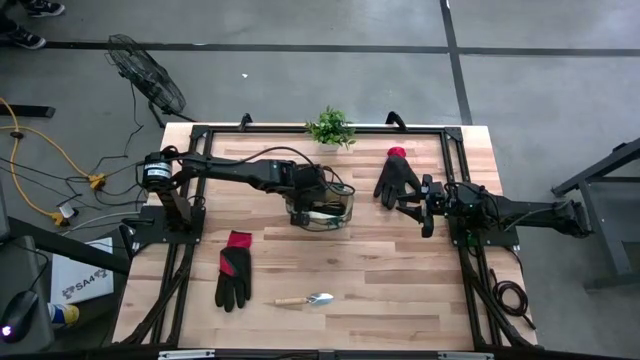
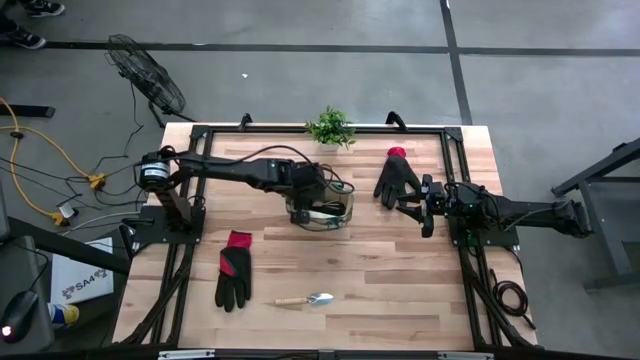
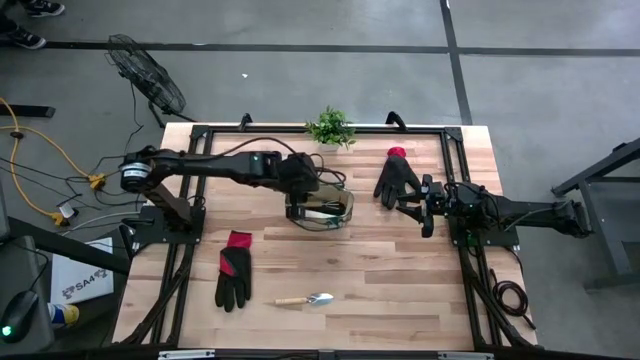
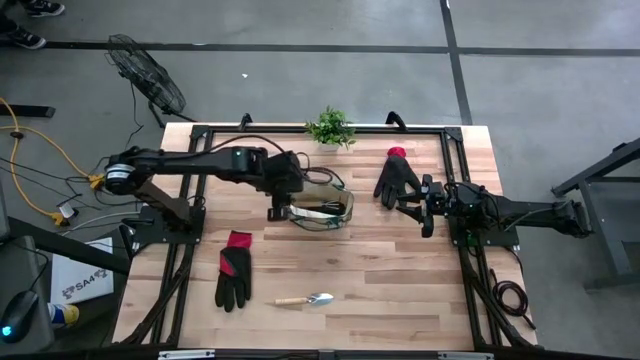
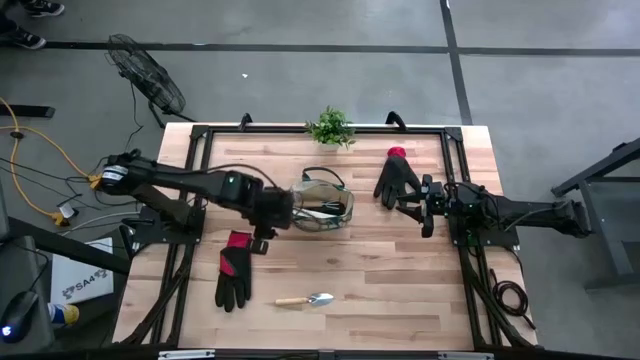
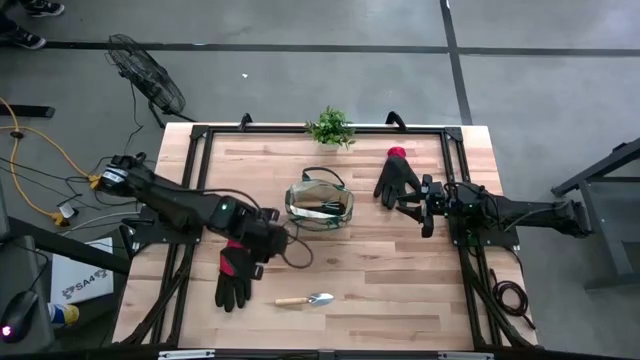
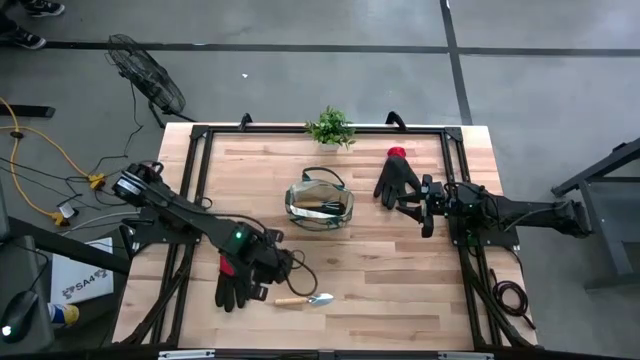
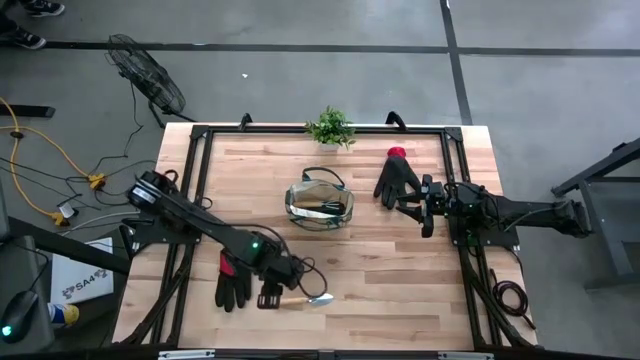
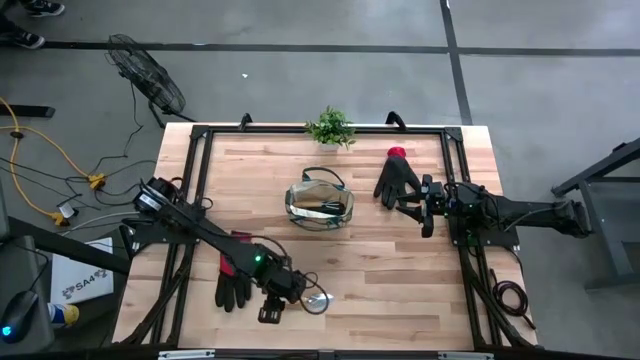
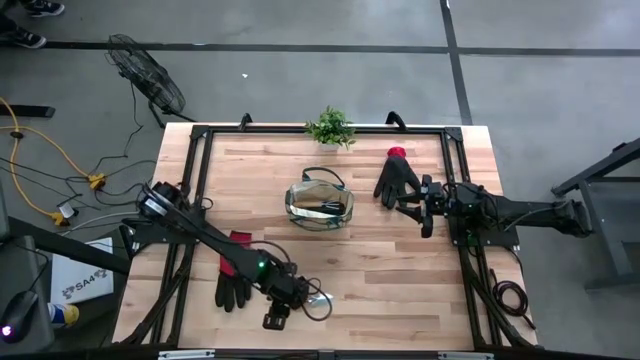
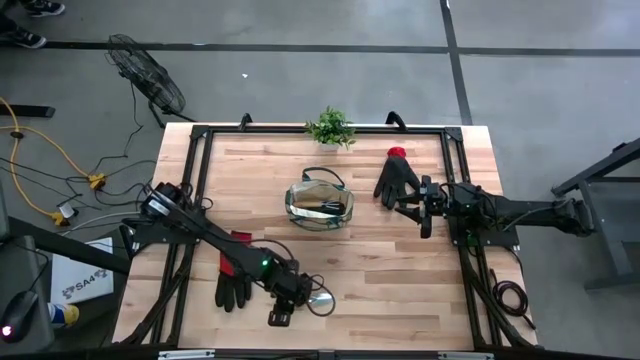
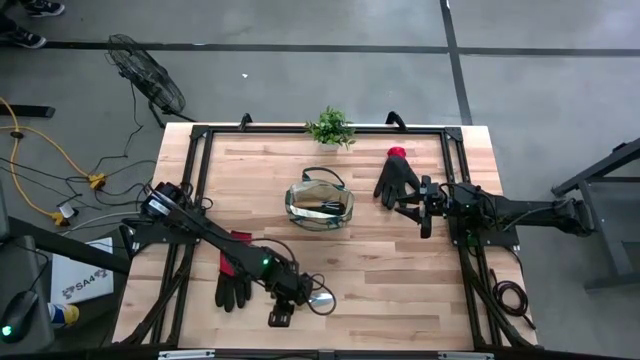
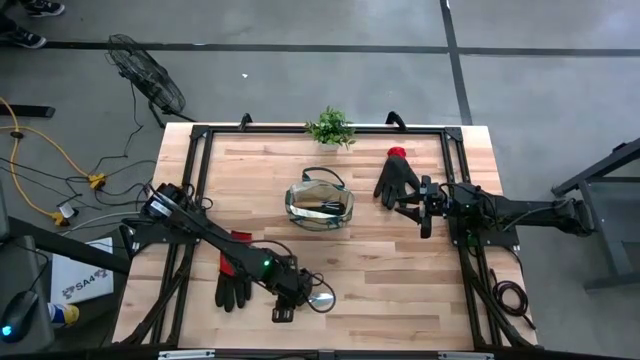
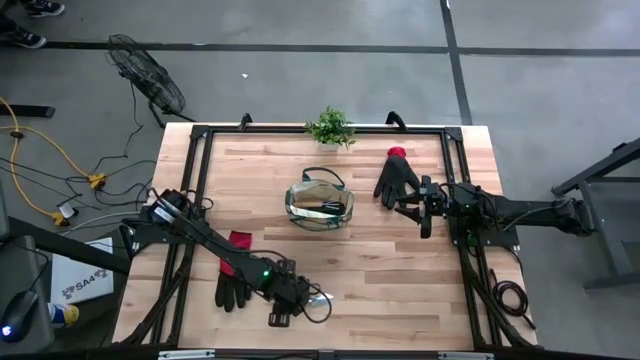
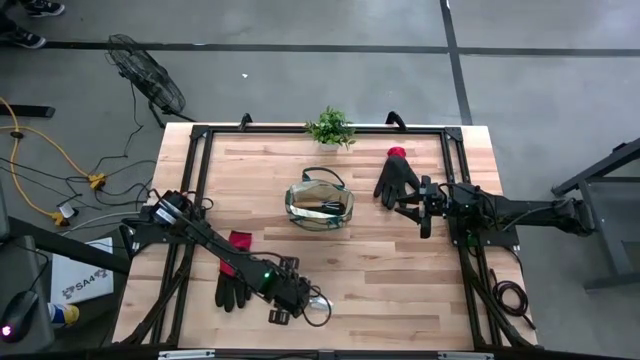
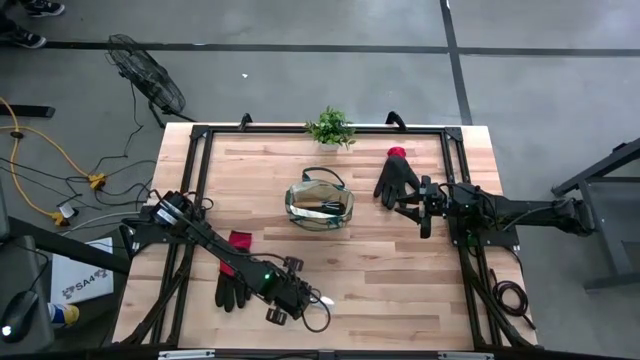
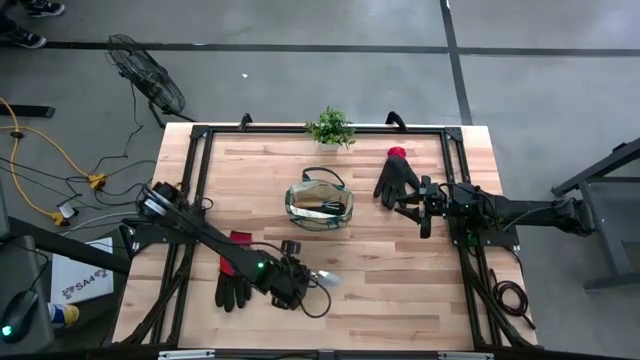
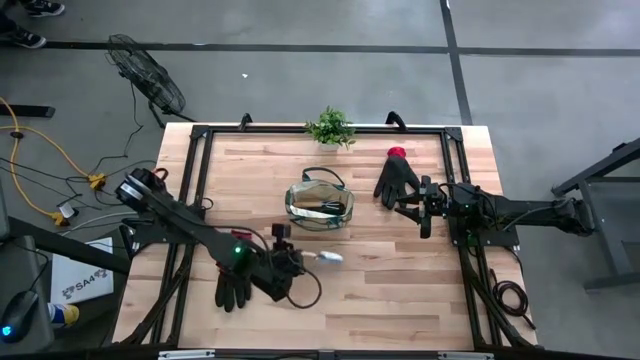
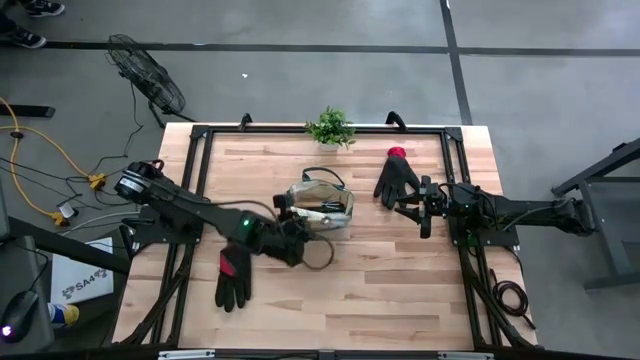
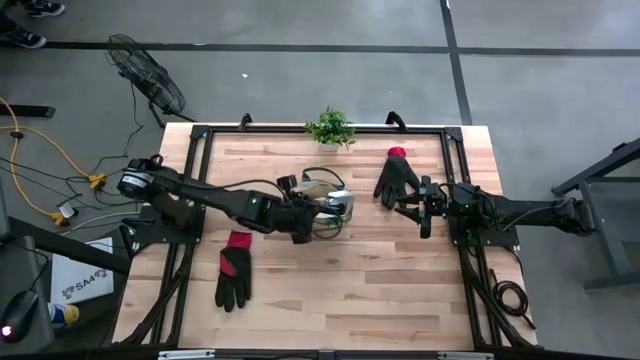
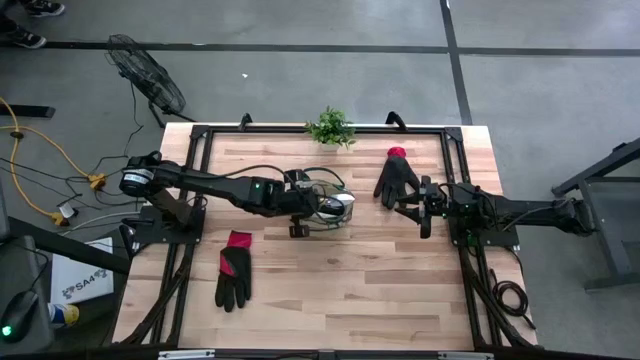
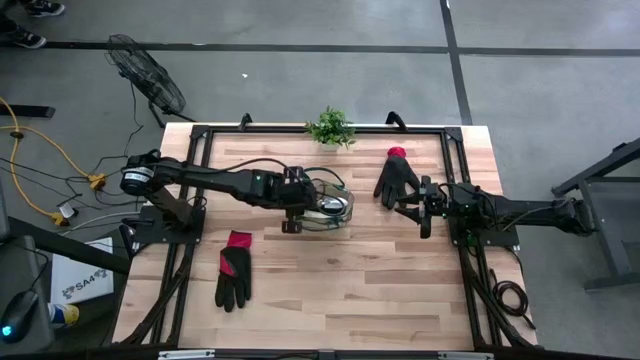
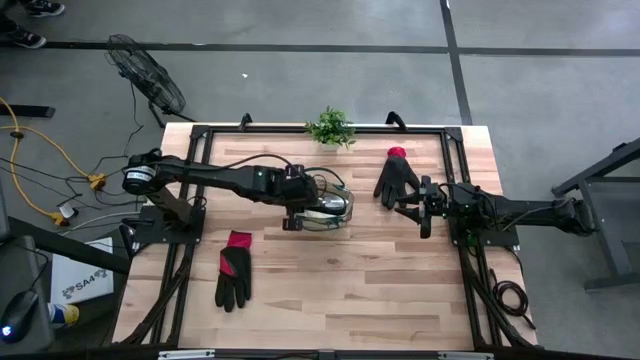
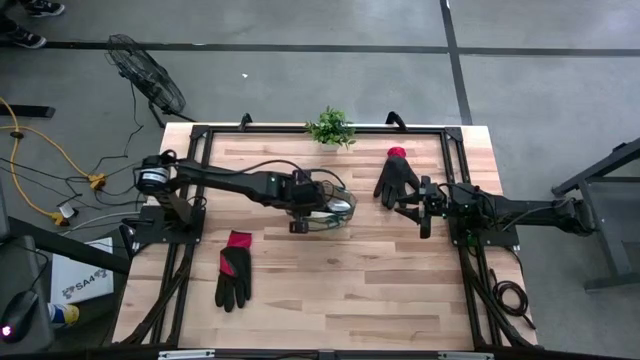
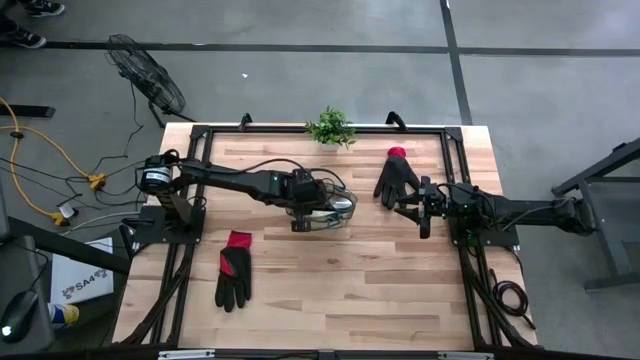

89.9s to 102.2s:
Task: Pick & Place Garden tools in Gardening bag
Put the brown trowel into the gardening bag

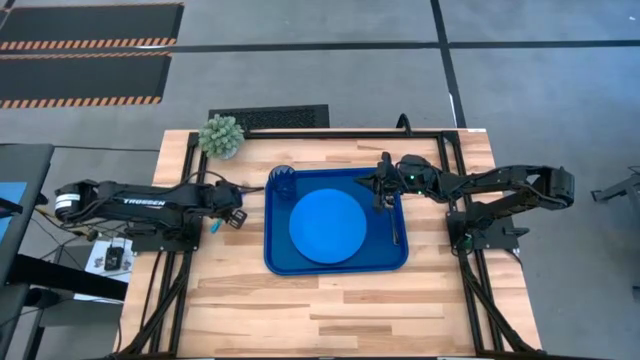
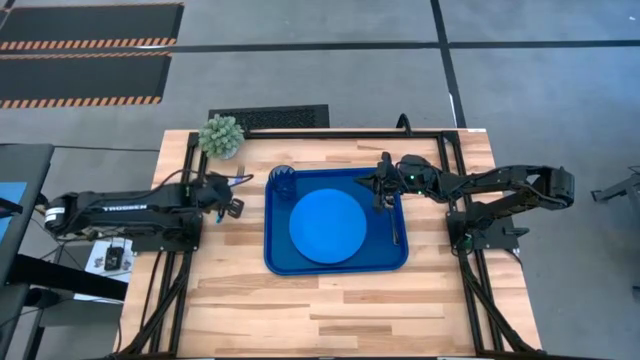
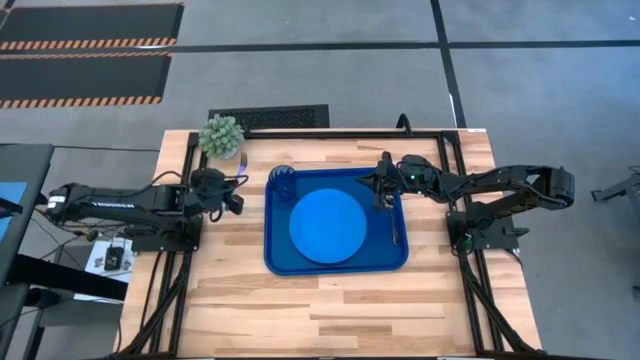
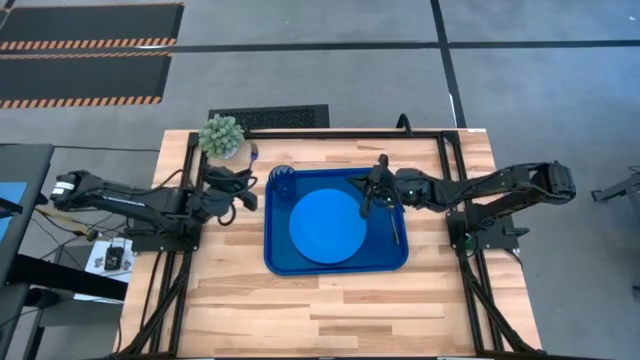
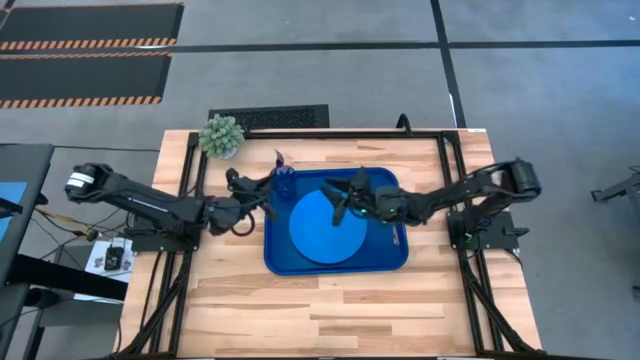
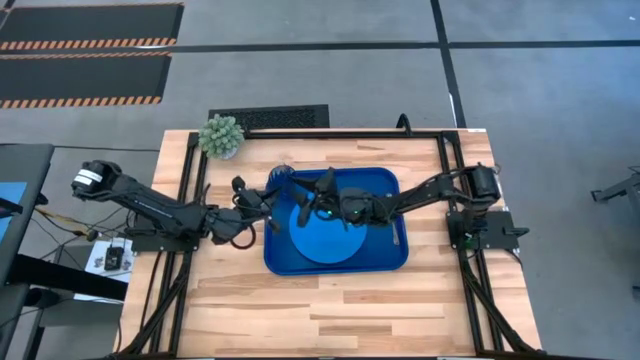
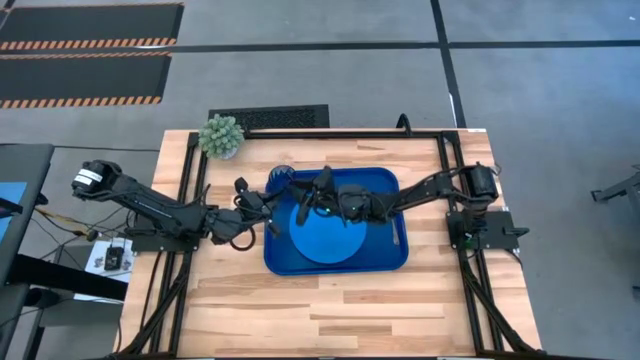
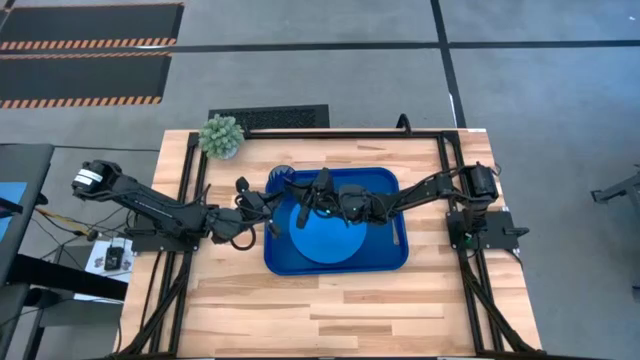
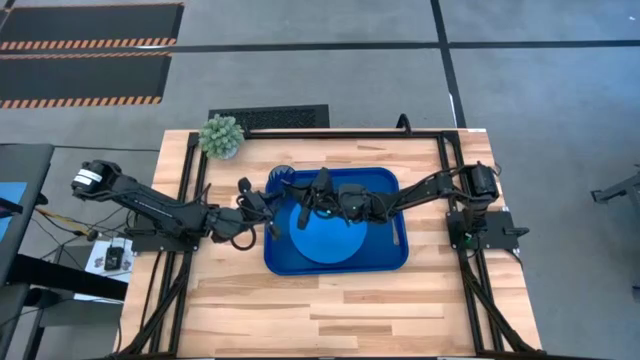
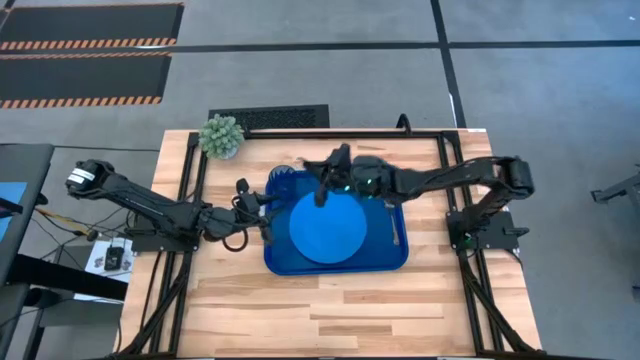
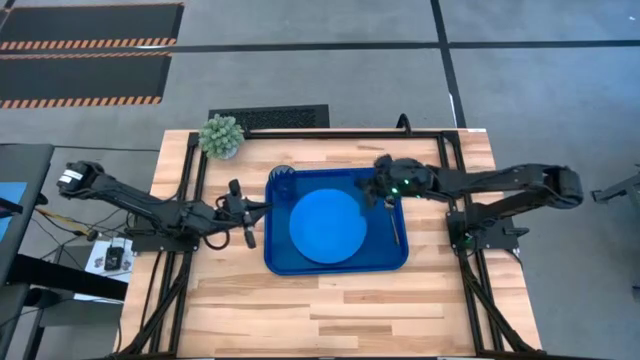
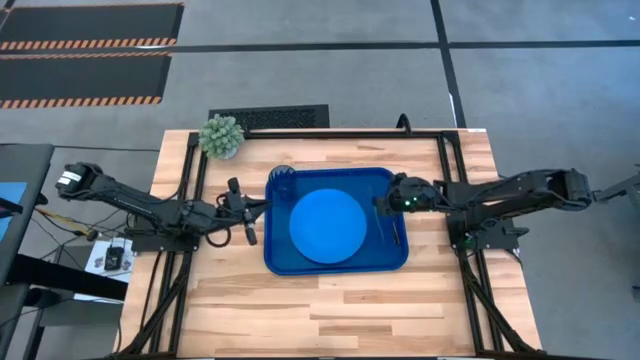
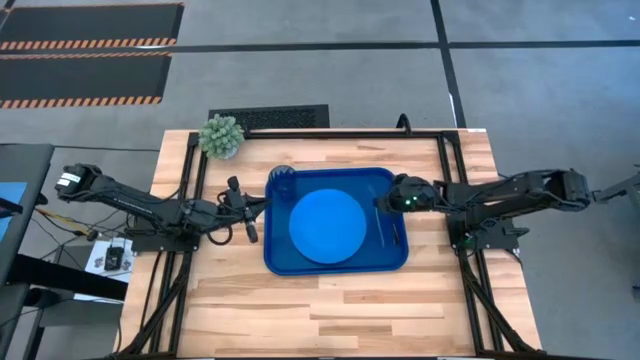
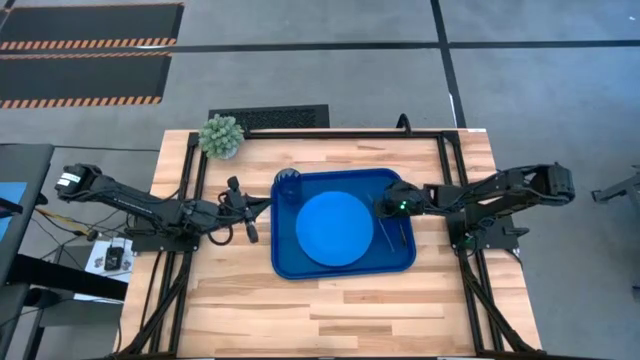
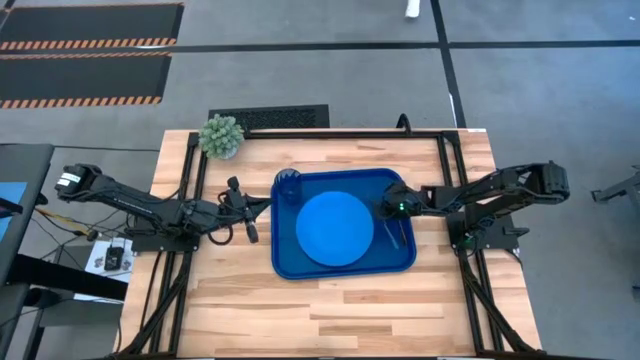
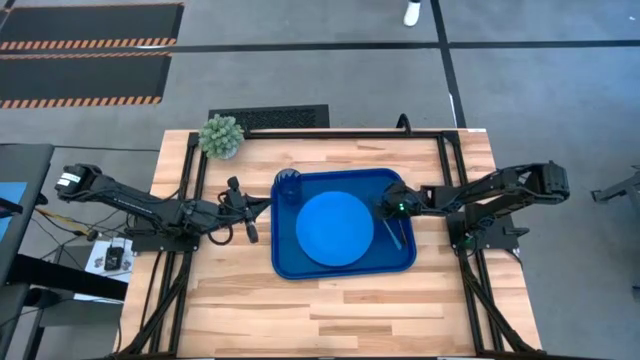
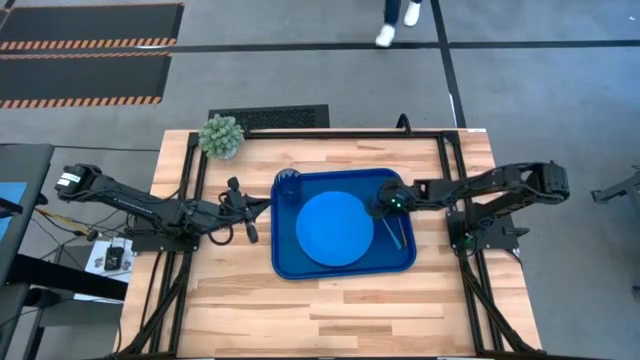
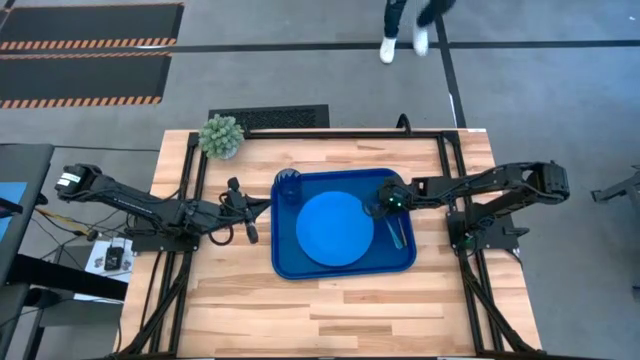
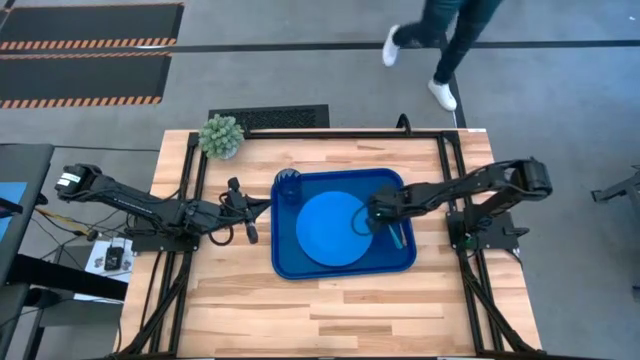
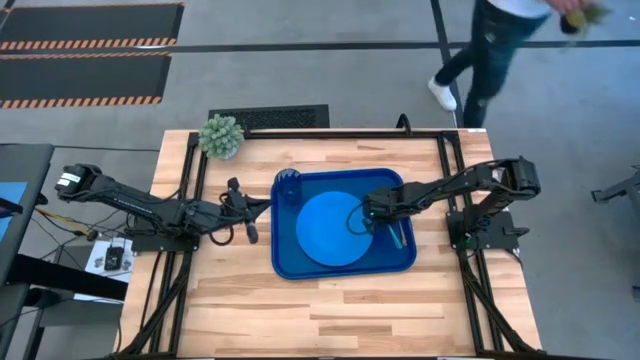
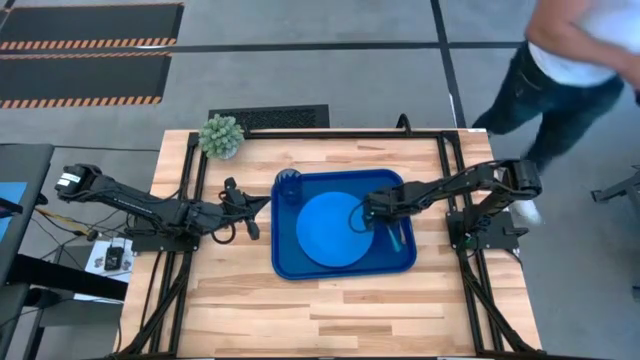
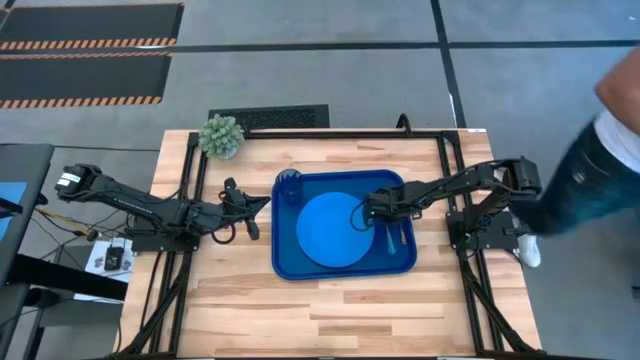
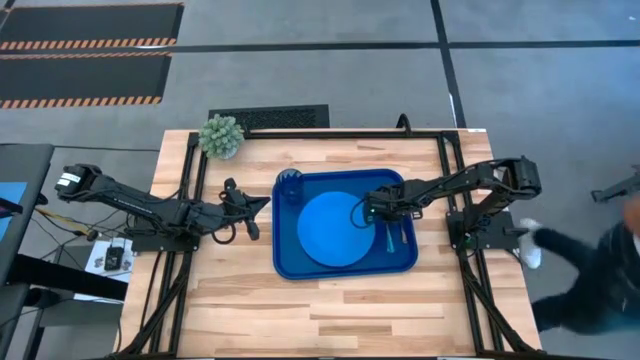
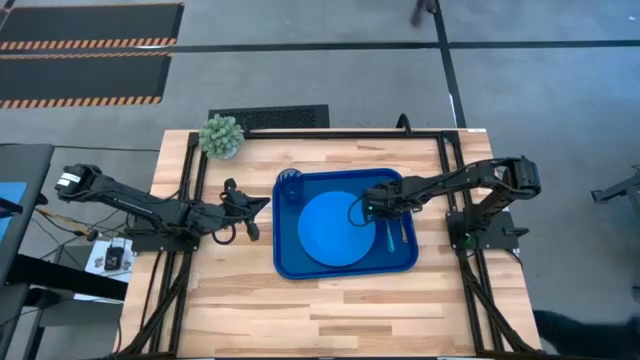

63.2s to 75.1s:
Task: Pick and place plate/cup/fork/spoon on tray
Put the blue fork on the blue tray to the left of the black spoon
